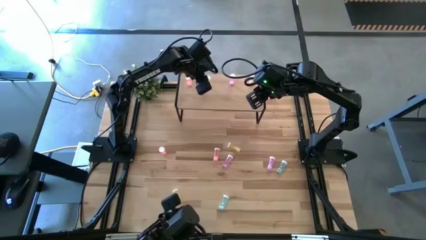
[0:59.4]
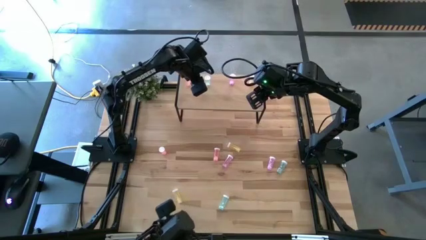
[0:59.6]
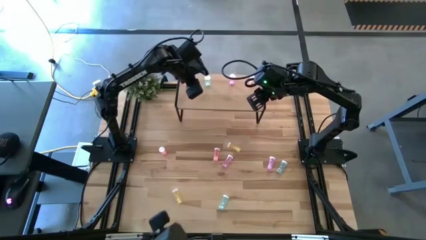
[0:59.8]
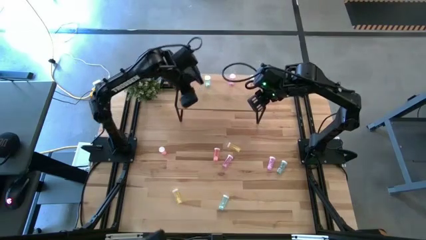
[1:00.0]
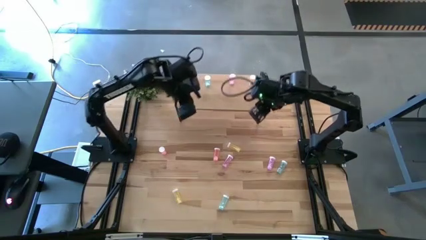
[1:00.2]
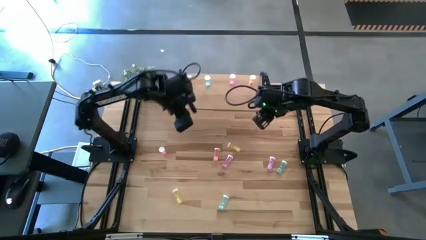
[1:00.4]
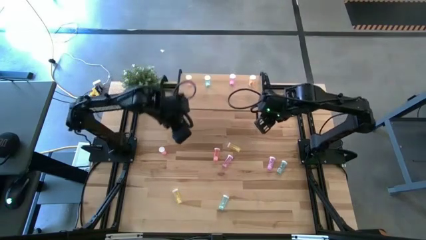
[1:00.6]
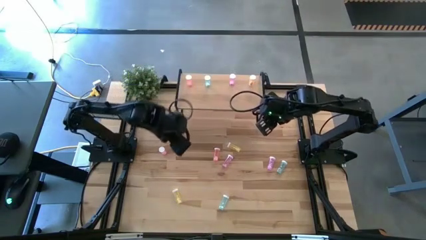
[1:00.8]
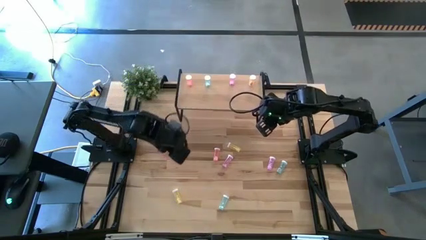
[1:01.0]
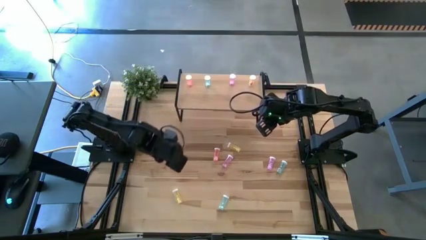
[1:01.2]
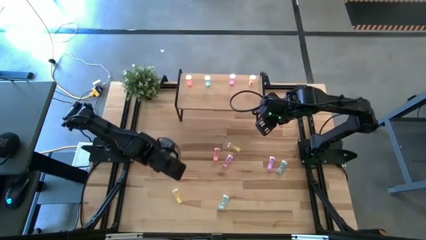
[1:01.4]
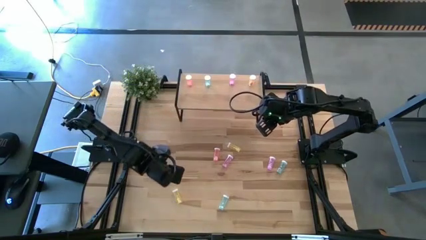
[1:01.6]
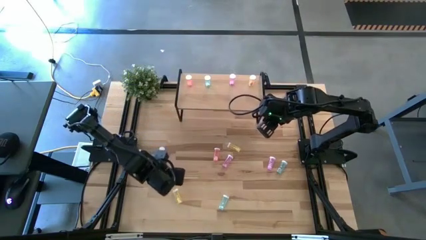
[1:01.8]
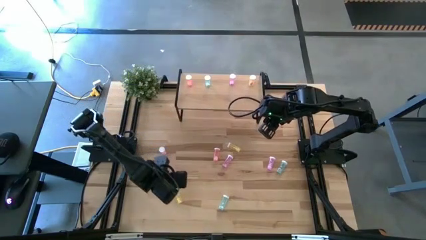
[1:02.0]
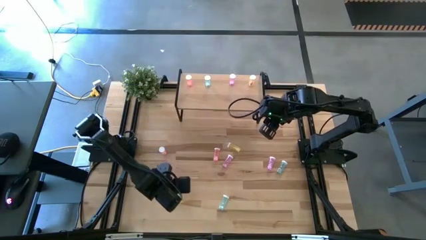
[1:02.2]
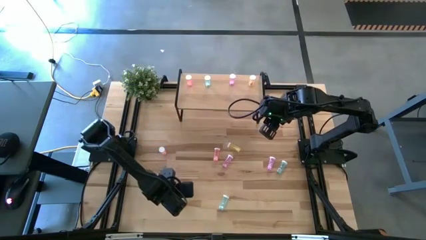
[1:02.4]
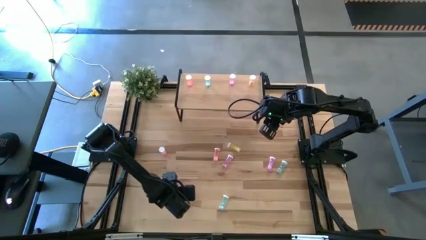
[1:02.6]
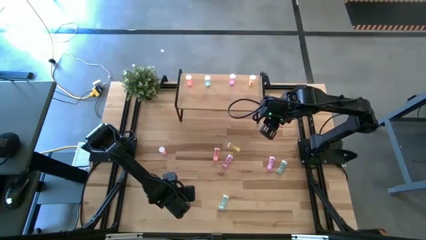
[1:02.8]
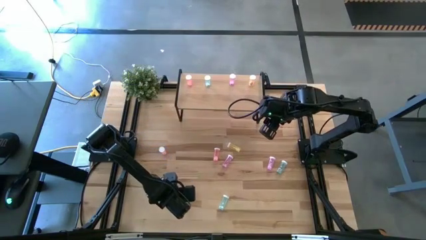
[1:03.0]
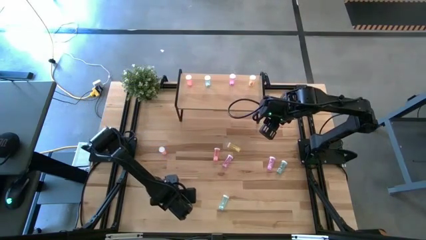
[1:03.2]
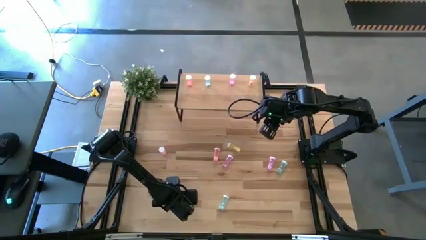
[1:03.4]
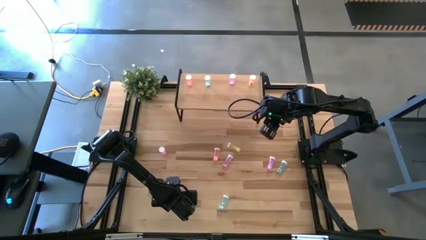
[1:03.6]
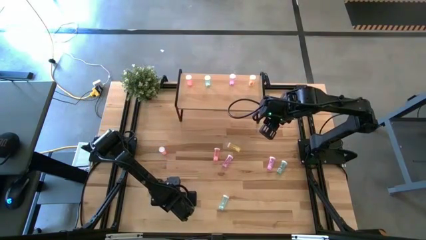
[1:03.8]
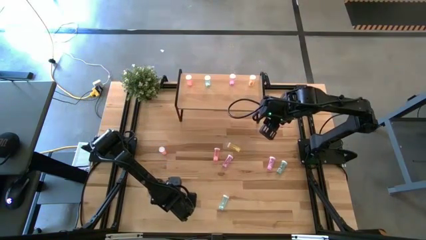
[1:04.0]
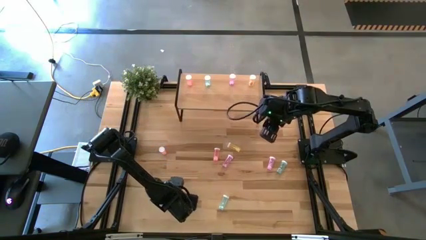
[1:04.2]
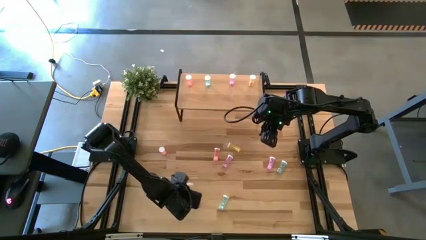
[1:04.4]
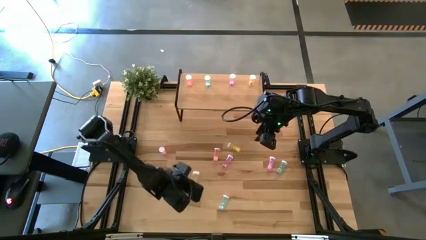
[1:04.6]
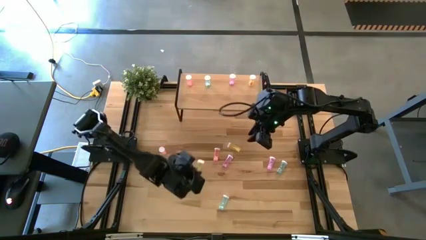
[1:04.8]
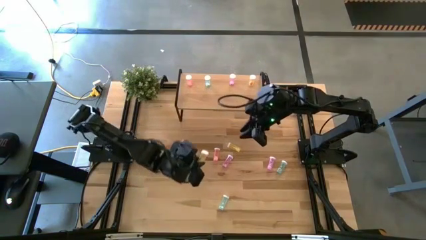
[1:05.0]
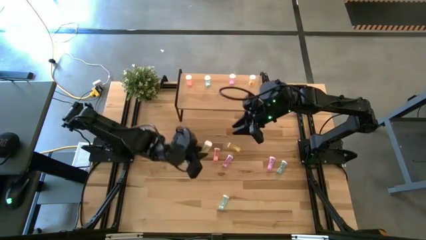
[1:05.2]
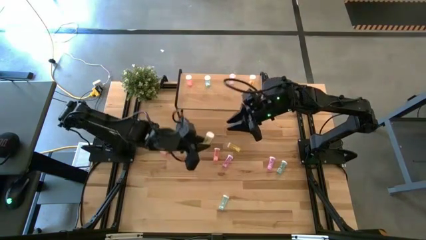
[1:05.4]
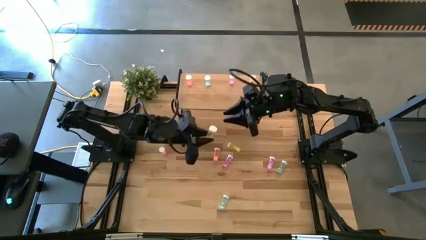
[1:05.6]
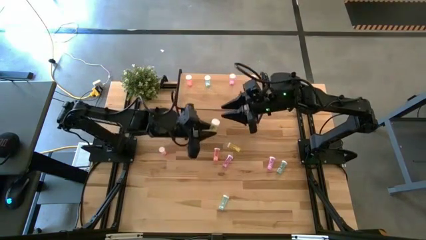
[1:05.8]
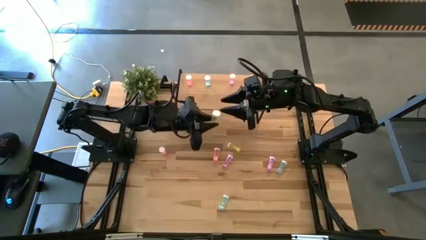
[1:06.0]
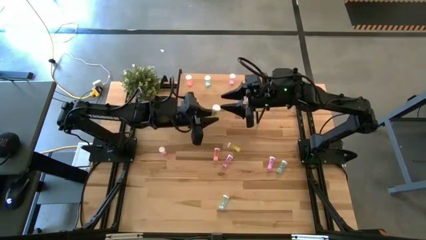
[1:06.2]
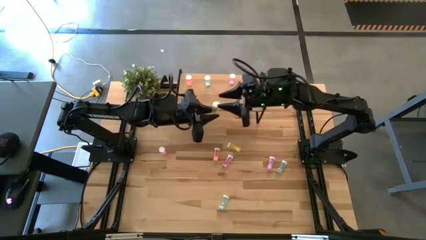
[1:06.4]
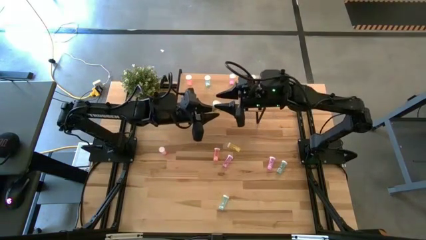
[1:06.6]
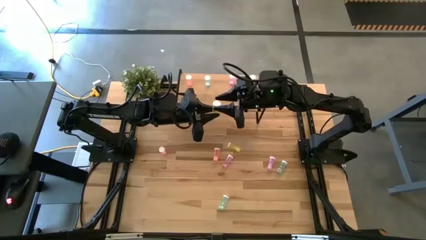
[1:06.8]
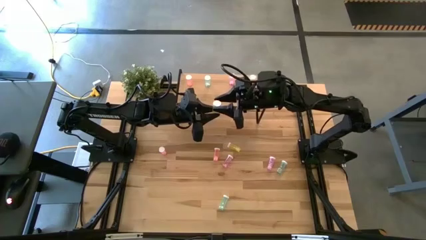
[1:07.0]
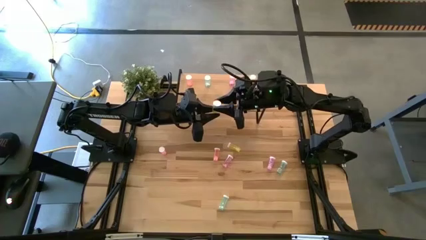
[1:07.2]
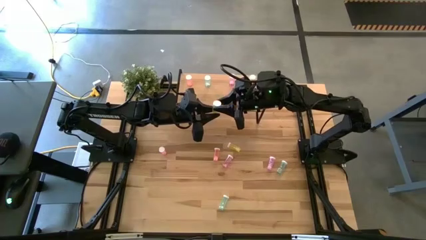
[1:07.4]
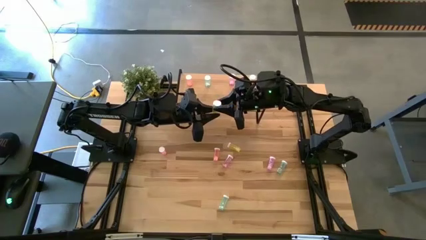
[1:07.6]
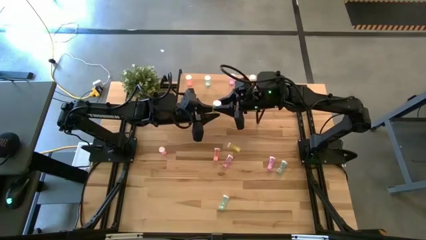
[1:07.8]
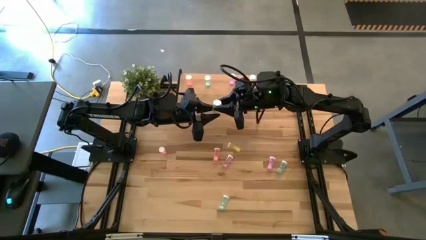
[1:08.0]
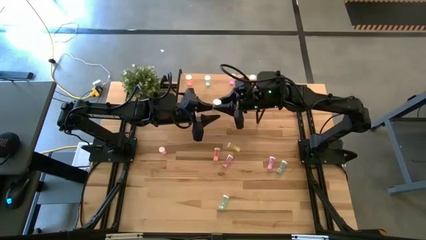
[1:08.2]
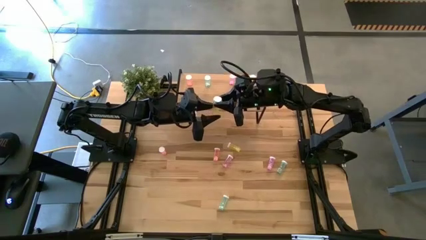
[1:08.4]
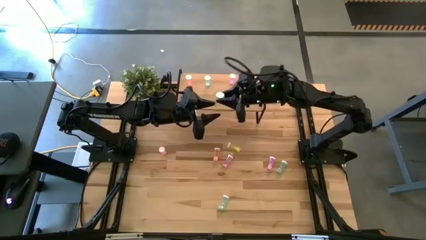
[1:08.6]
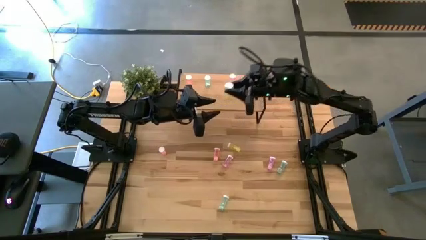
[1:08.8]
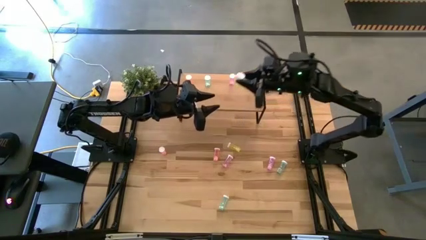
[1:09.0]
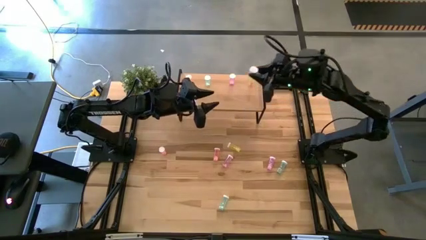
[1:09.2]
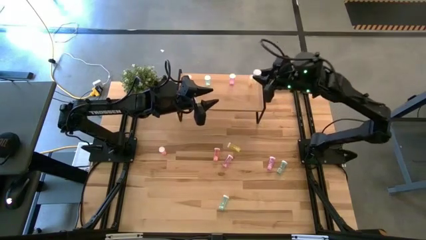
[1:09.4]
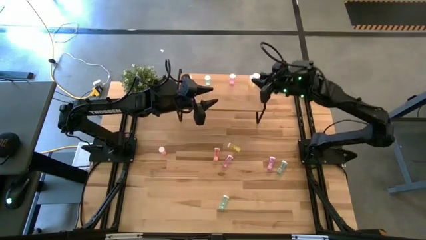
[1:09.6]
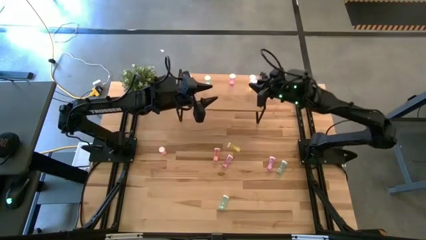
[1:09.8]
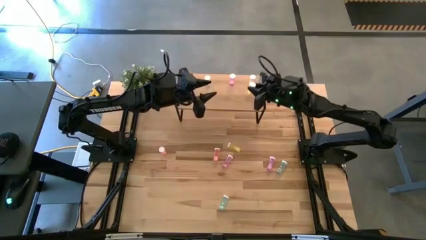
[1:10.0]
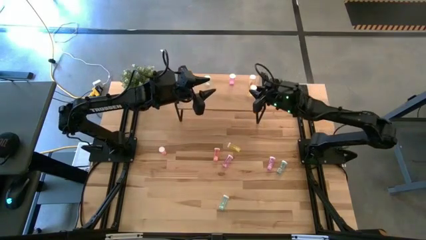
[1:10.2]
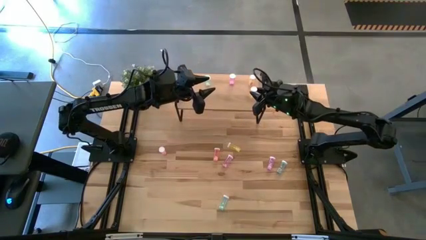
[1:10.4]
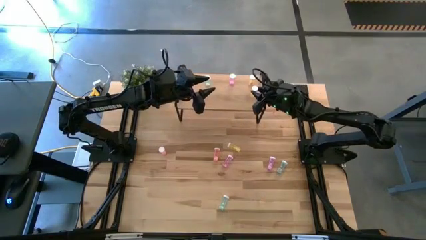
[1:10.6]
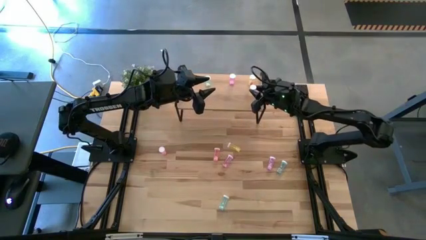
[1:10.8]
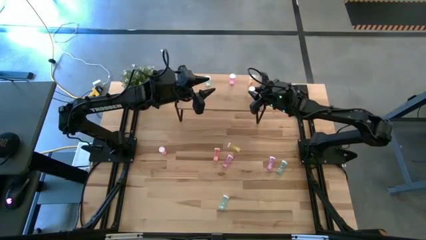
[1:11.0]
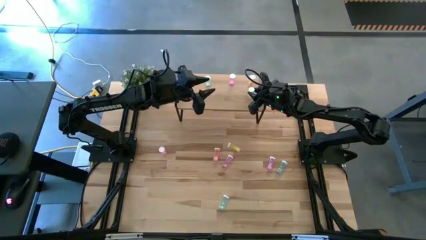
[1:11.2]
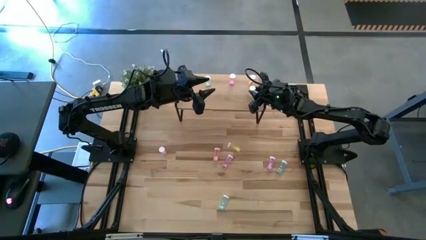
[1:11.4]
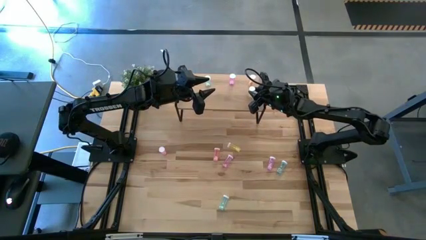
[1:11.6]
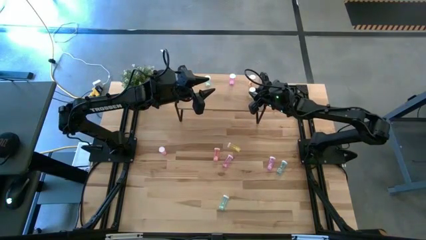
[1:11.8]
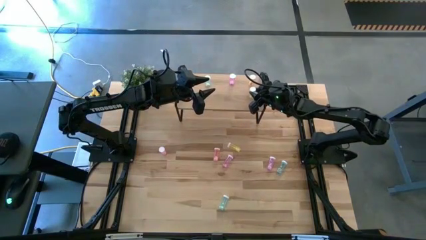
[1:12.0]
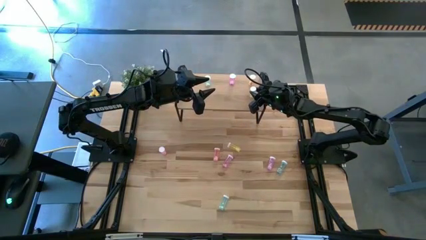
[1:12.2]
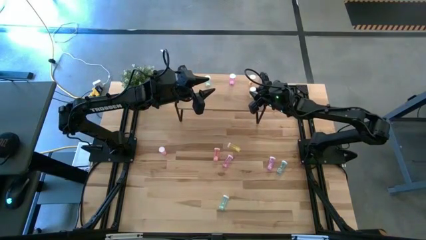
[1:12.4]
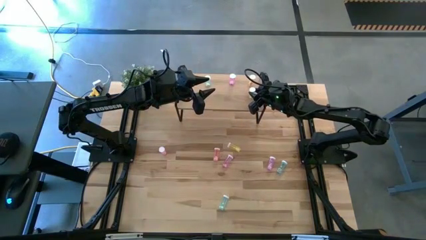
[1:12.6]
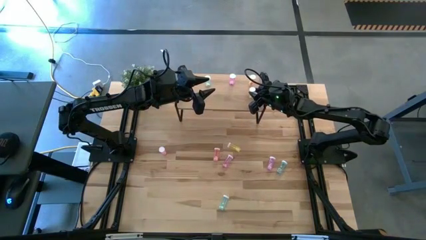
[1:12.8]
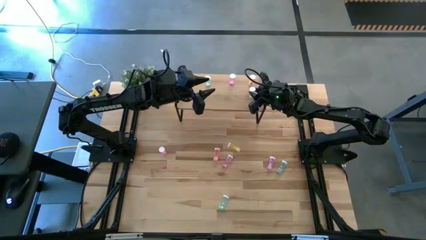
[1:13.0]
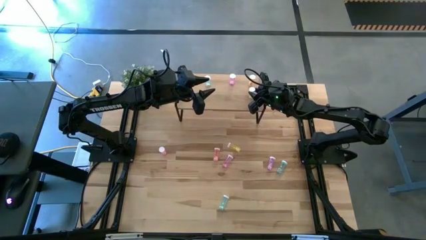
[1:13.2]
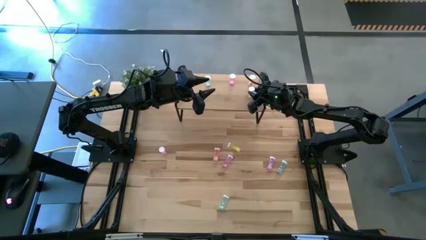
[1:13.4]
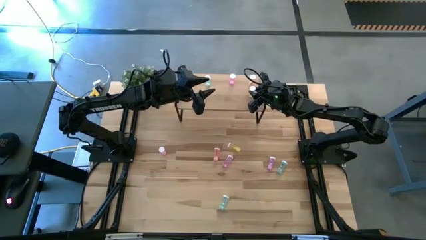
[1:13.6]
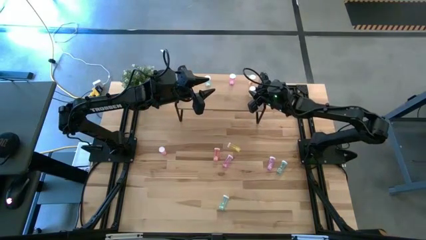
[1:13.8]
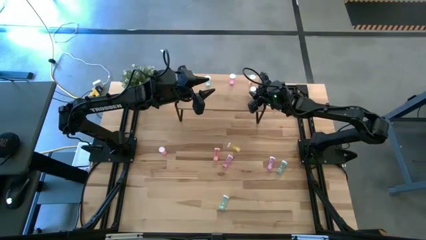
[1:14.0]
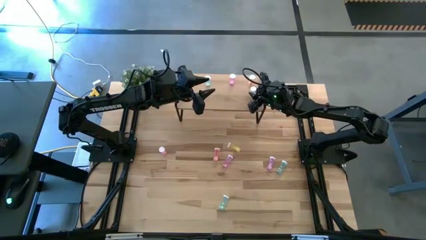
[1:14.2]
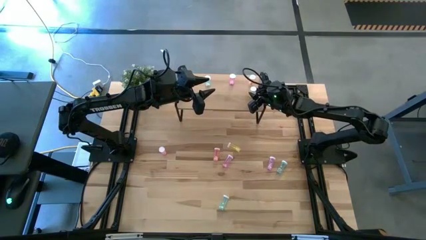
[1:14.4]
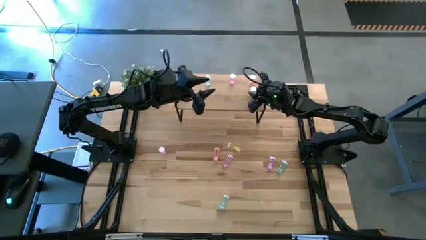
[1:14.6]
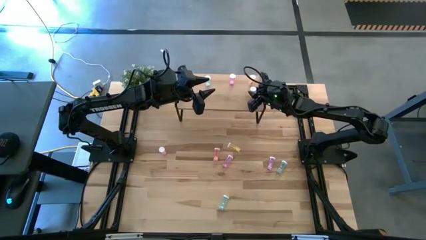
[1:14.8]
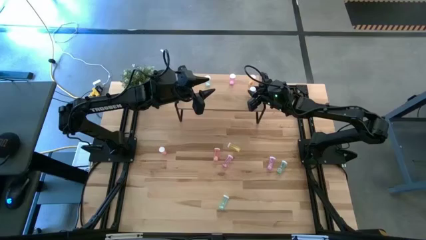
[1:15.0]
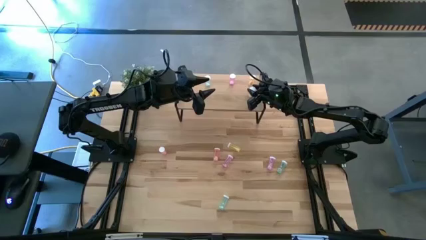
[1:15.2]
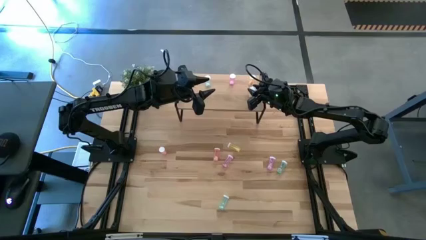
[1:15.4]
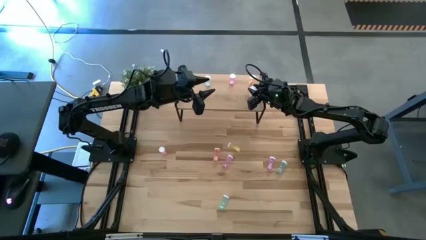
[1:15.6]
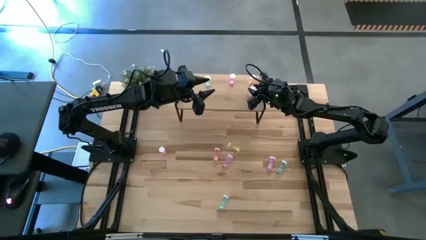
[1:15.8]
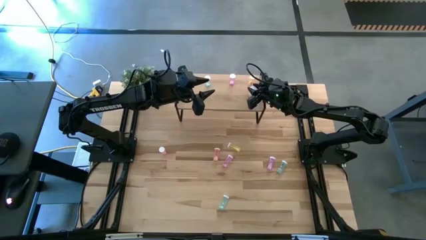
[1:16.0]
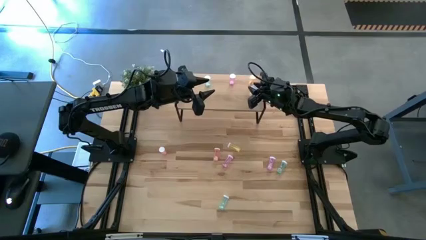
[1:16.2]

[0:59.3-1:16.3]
Task: Pick and place medicine bottles onto shelf by color
Put the bottom left yellow pill bottle on the shelf aligned with the other yellow pill bottle
